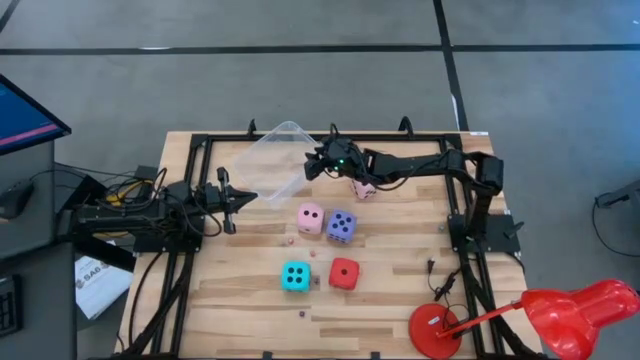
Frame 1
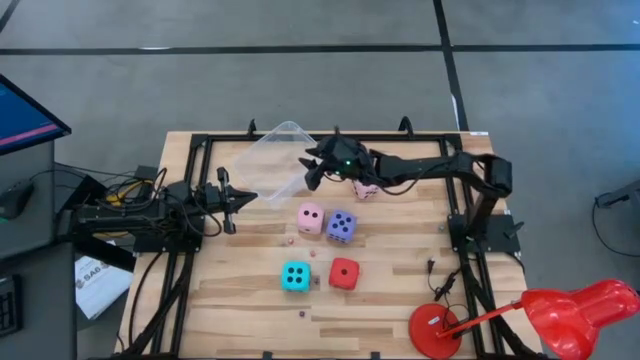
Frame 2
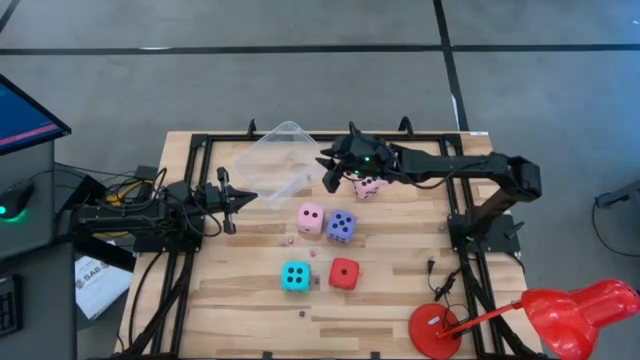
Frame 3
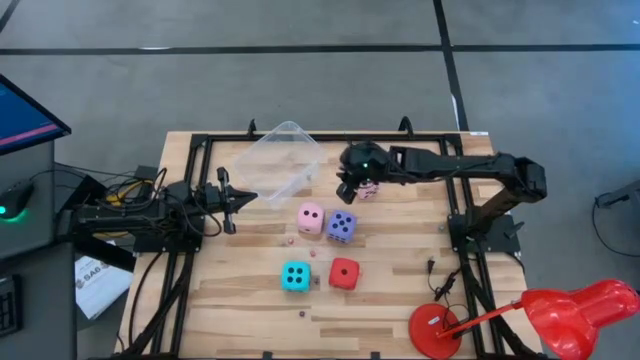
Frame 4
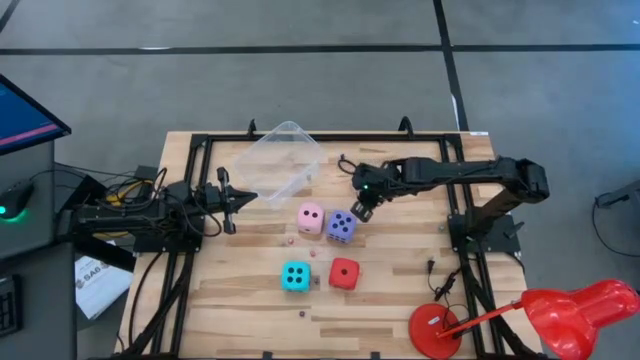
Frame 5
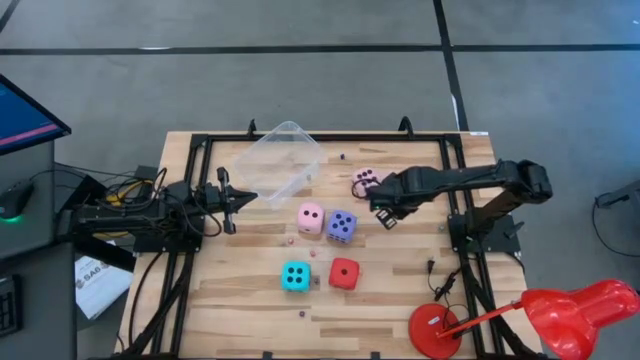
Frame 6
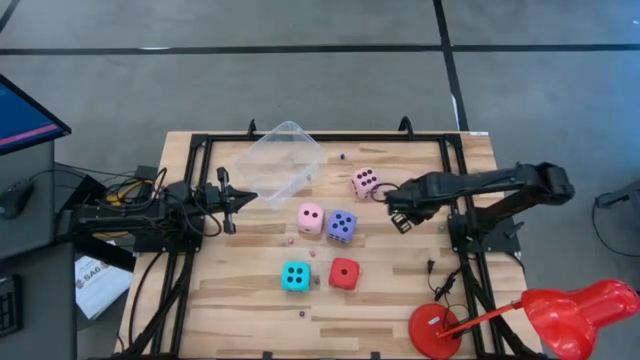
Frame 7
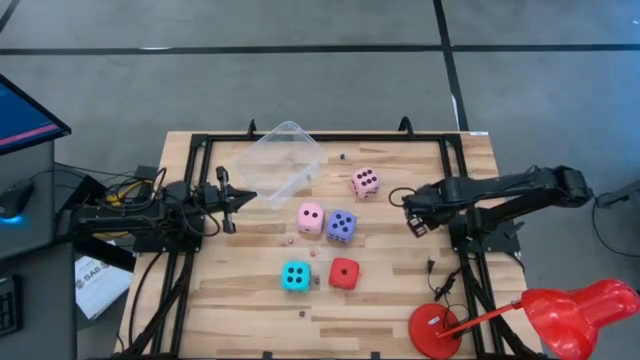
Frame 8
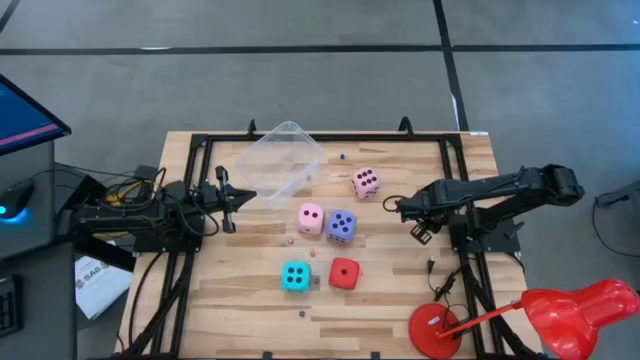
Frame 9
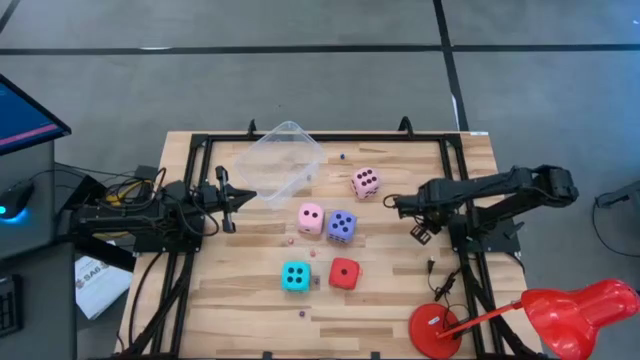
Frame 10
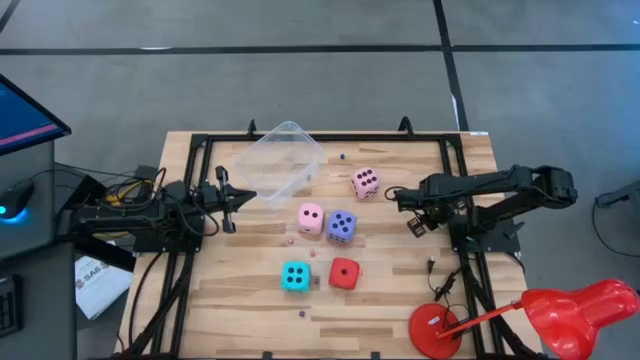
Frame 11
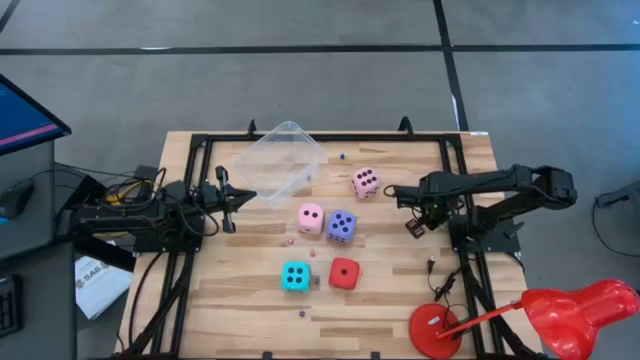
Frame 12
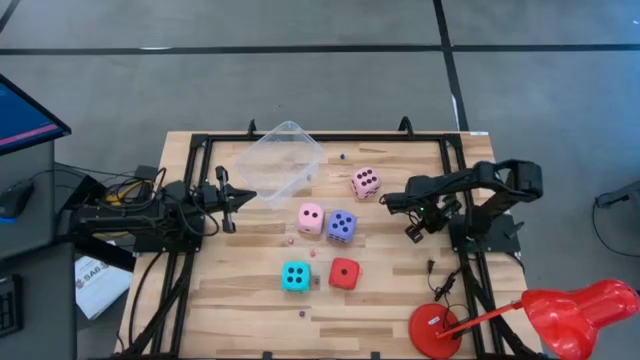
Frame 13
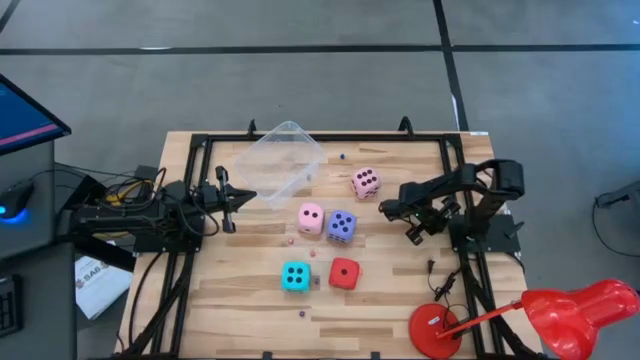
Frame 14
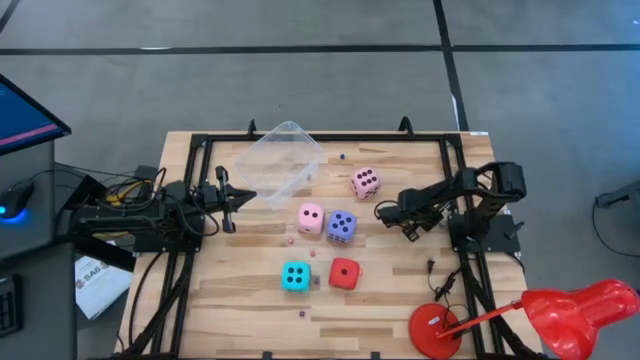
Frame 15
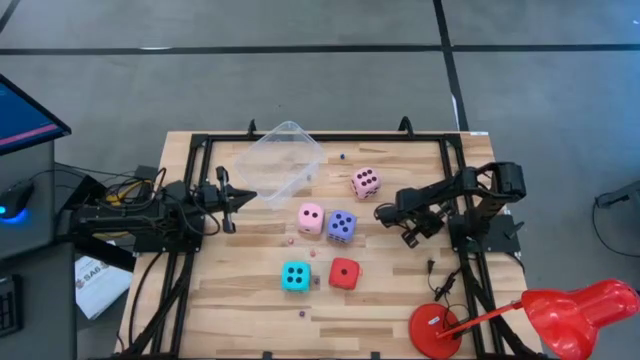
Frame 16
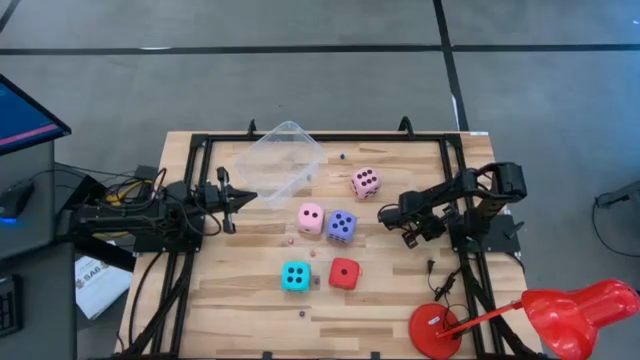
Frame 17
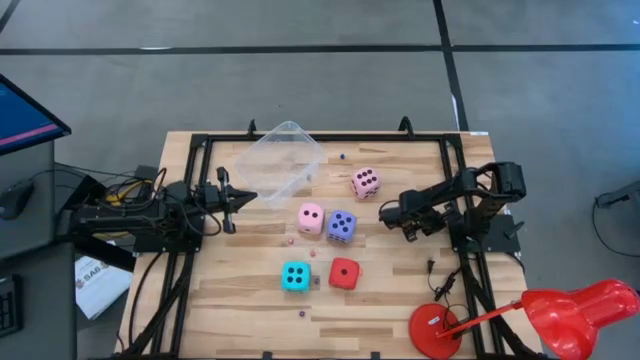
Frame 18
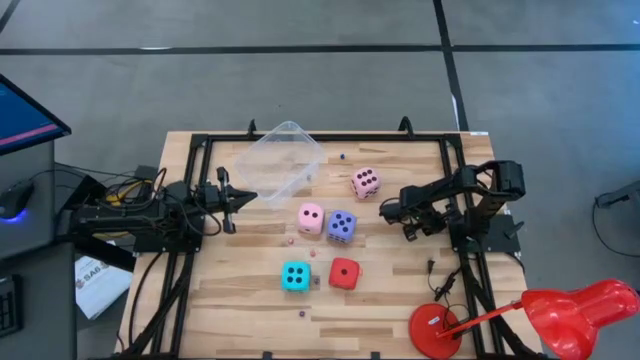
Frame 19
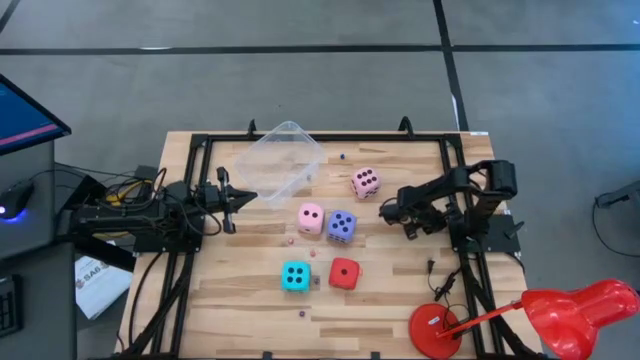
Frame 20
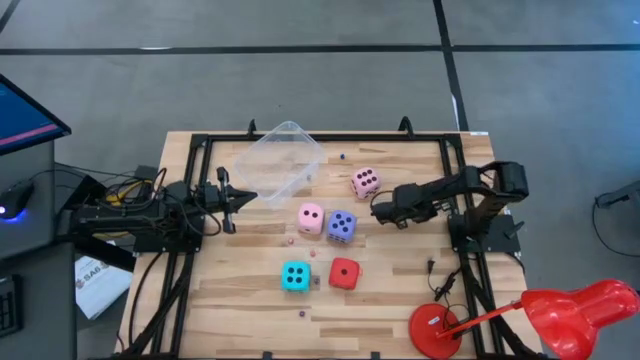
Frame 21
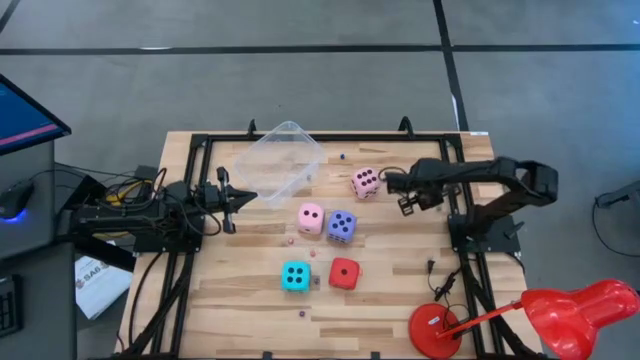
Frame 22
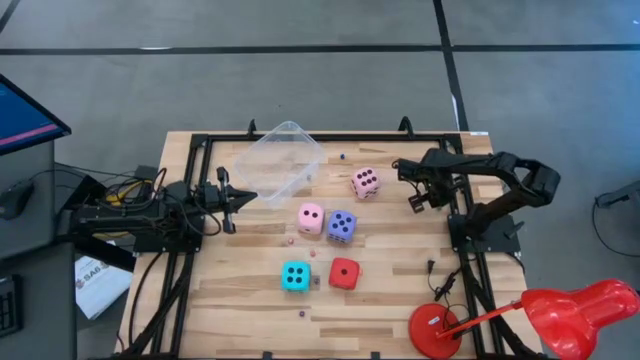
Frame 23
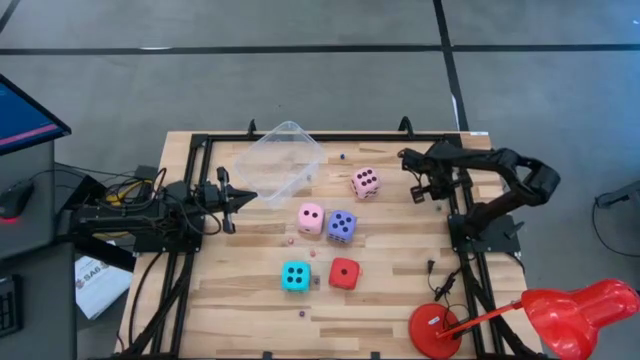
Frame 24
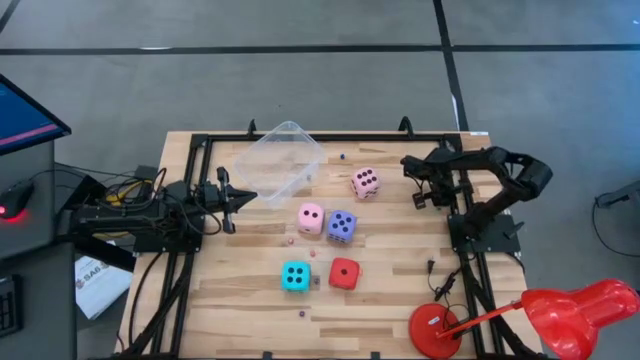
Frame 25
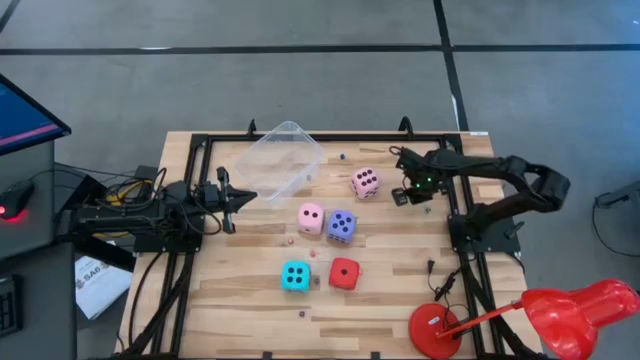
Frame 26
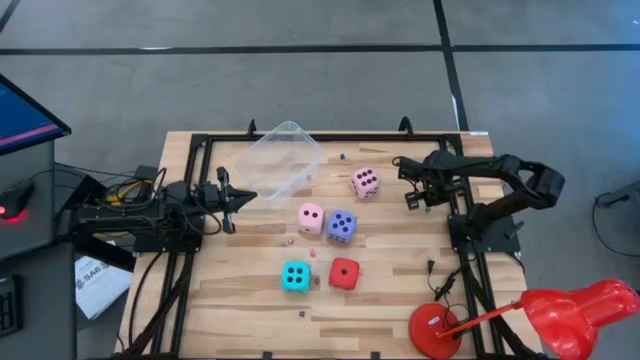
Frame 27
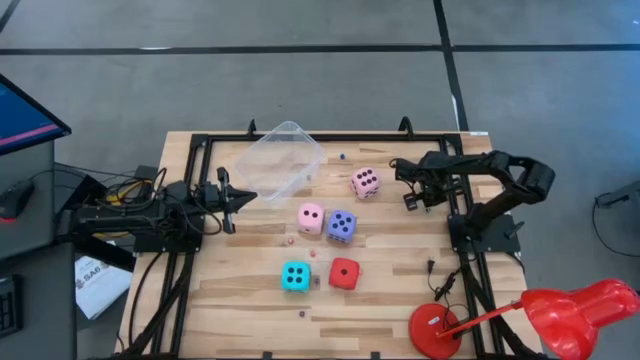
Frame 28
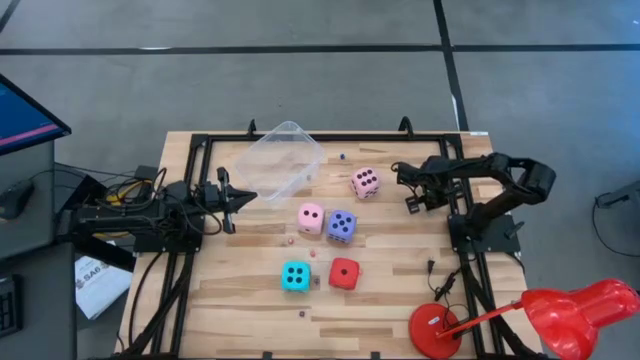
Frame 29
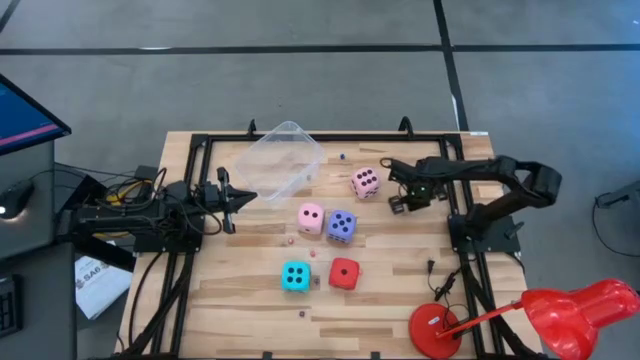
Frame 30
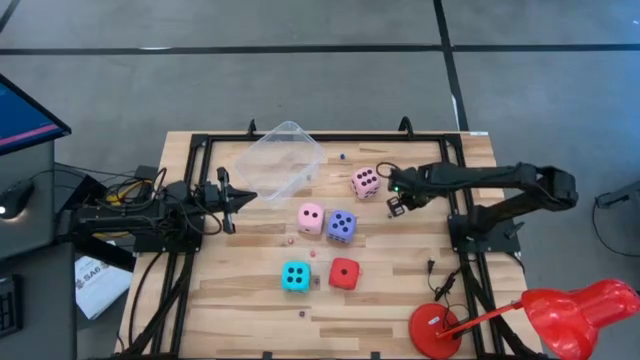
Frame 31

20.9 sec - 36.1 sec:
Task: Pick & Place Dice
Put the small green dice into the transparent container

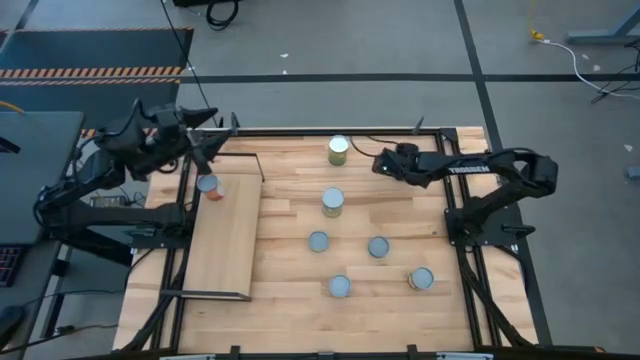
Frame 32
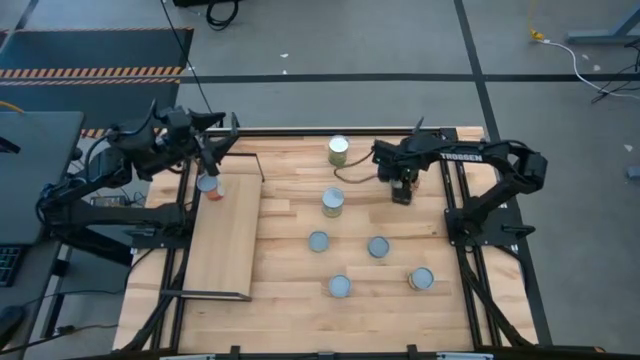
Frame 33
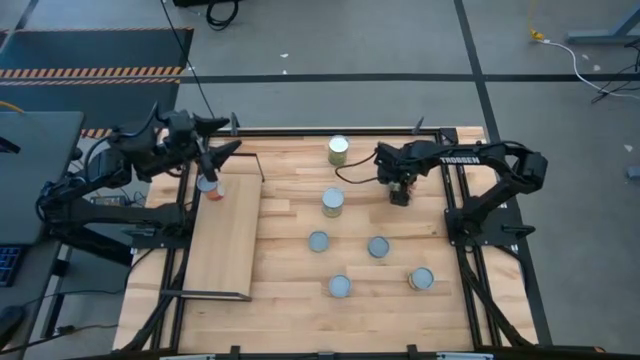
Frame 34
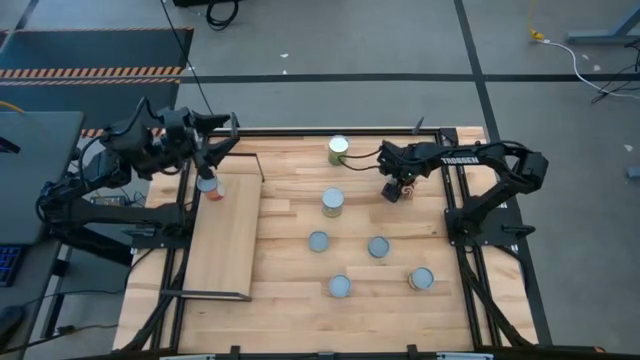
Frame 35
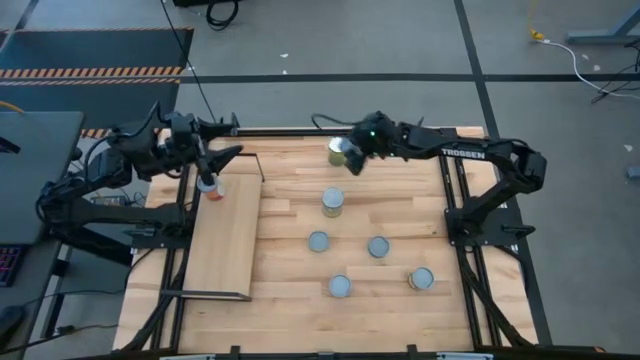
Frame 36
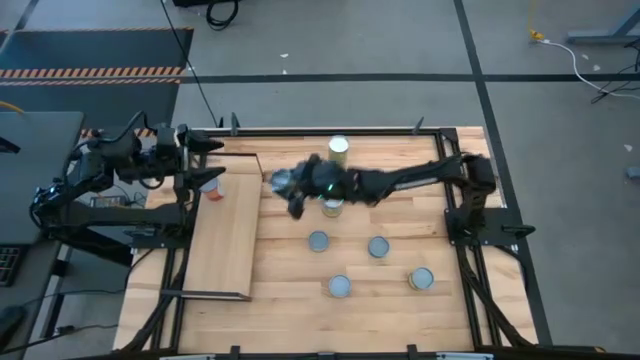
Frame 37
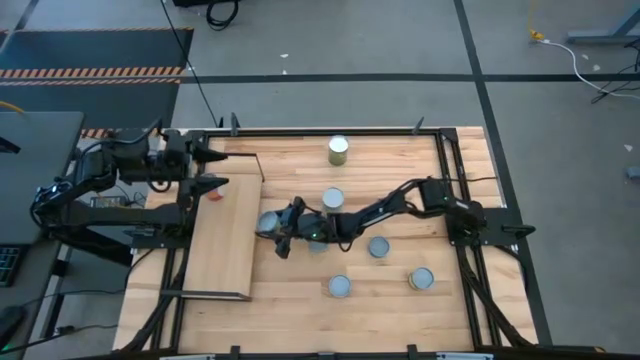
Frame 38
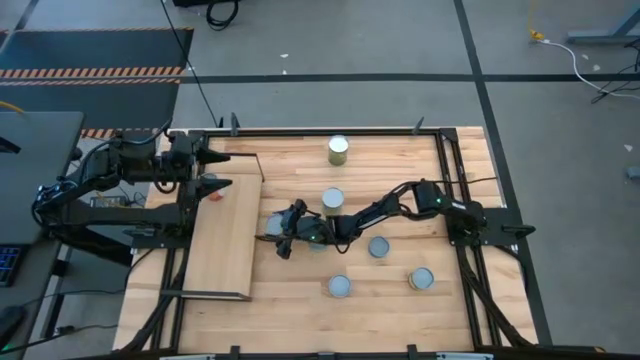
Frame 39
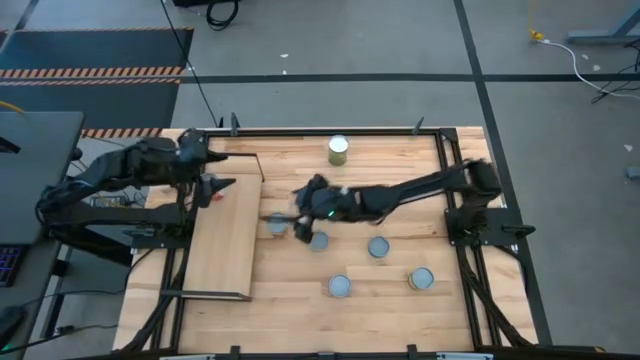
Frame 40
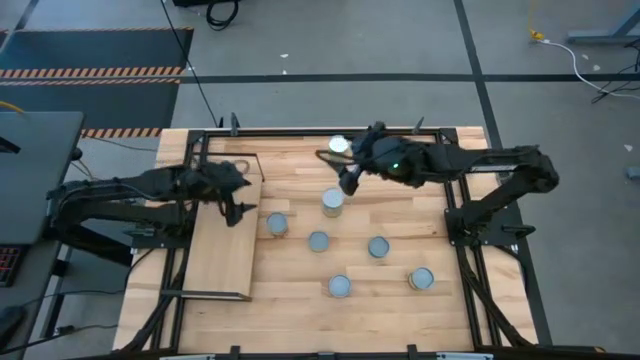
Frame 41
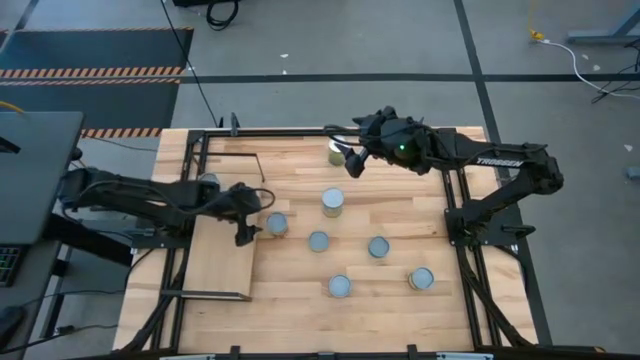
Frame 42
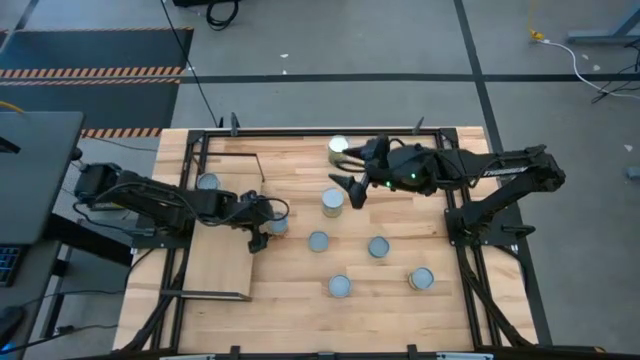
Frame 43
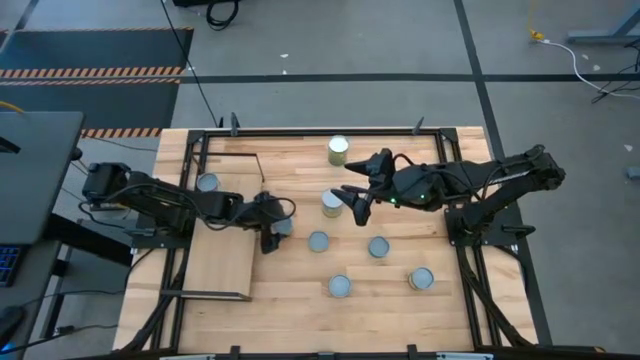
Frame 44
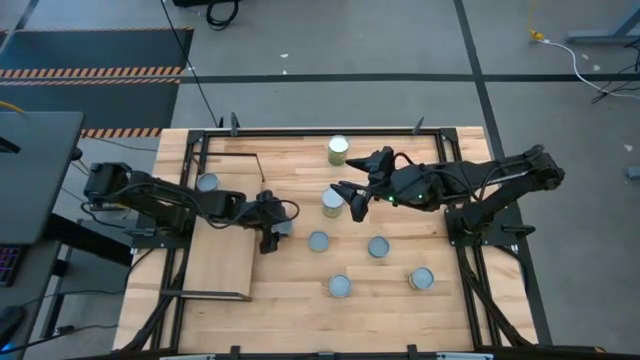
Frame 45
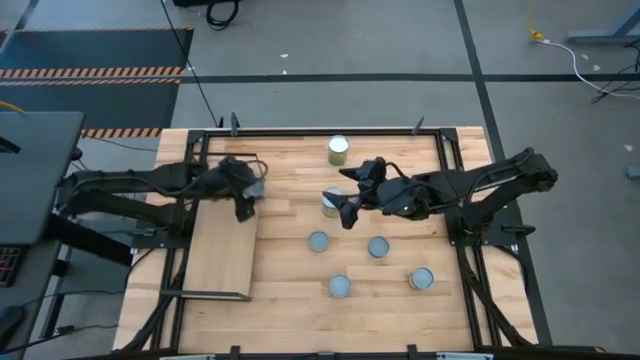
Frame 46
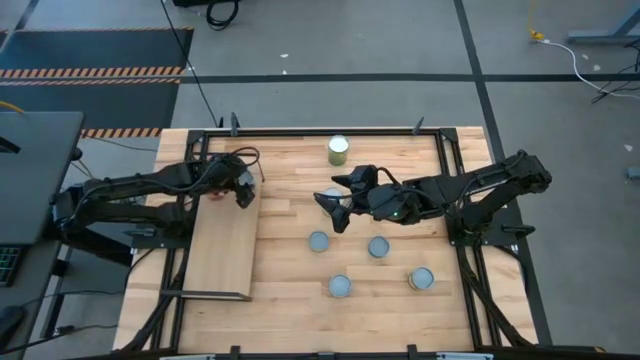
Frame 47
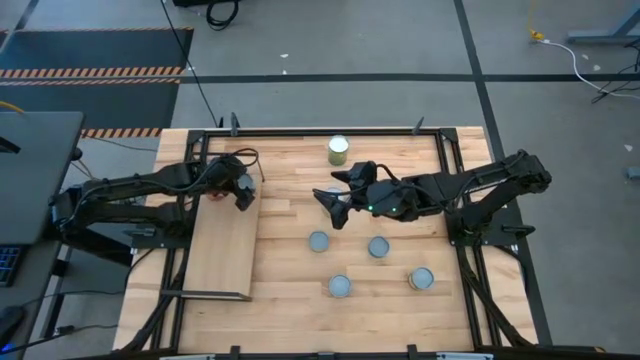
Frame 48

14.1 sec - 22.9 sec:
Task: Pick and place cans onto a shelf
Put the canned spaghetti sauce on the shelf
